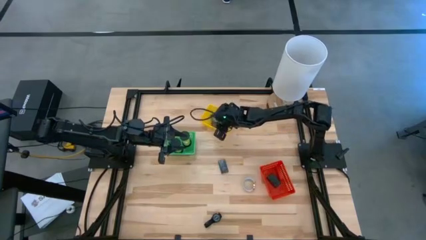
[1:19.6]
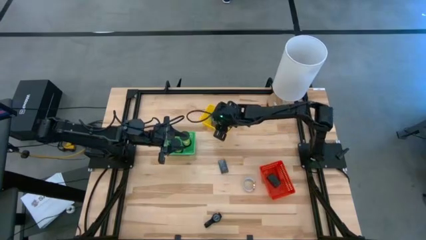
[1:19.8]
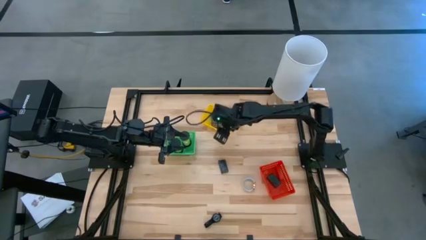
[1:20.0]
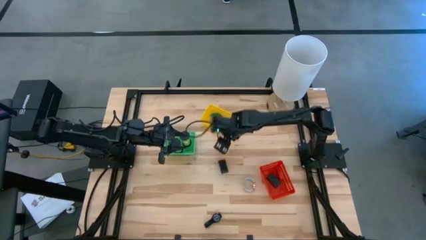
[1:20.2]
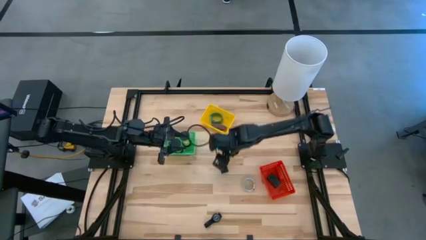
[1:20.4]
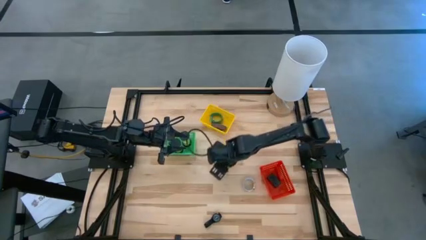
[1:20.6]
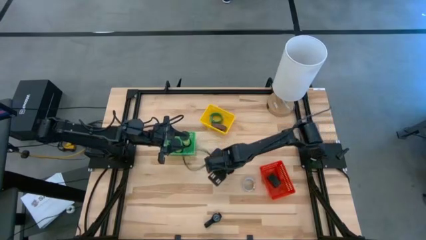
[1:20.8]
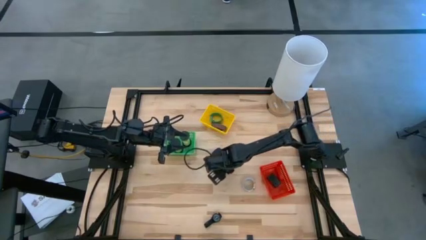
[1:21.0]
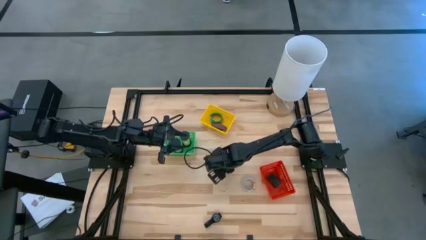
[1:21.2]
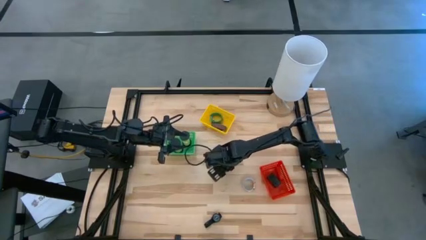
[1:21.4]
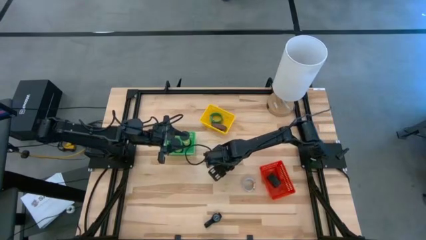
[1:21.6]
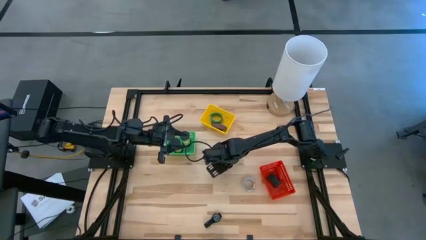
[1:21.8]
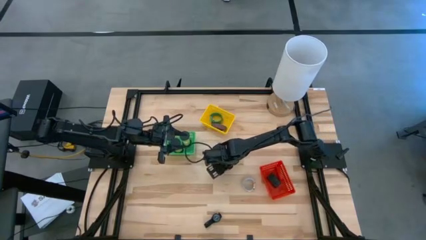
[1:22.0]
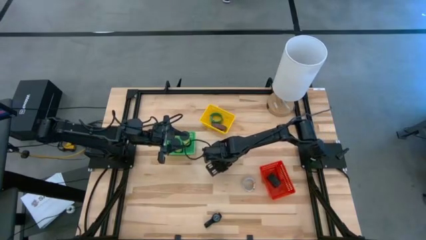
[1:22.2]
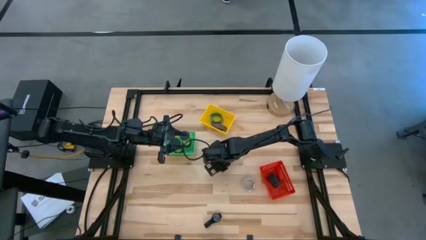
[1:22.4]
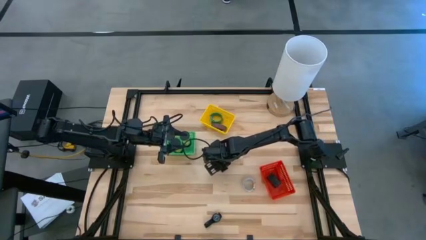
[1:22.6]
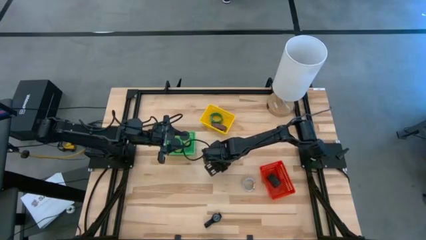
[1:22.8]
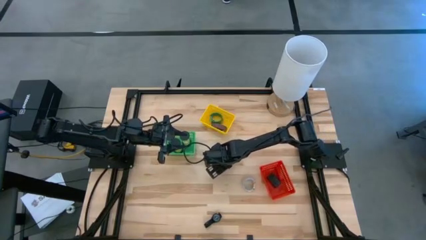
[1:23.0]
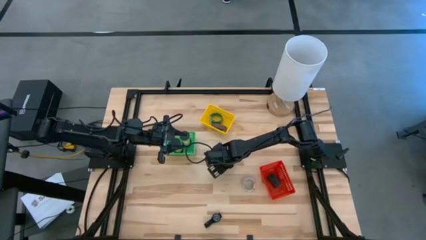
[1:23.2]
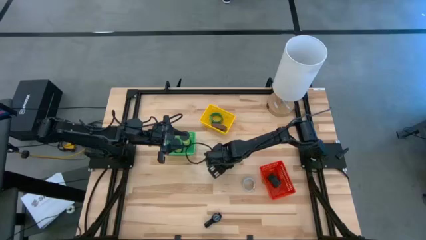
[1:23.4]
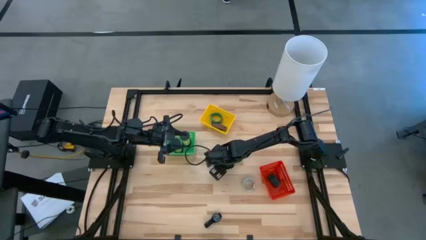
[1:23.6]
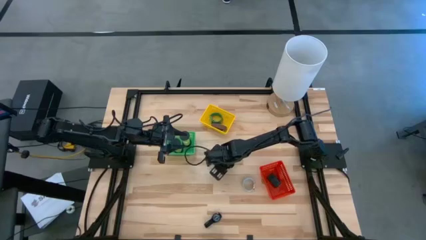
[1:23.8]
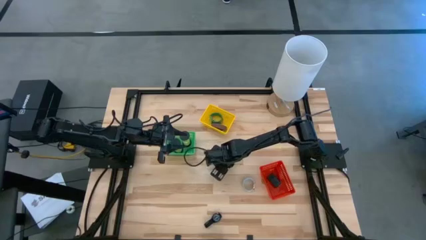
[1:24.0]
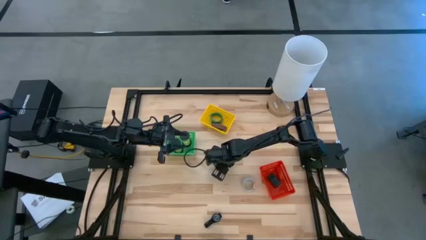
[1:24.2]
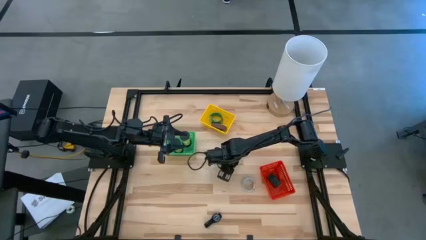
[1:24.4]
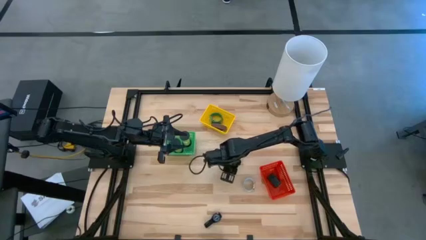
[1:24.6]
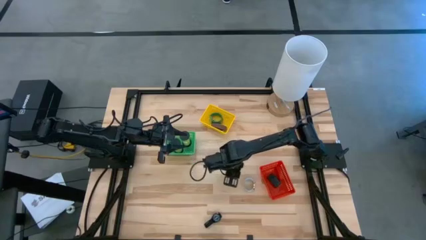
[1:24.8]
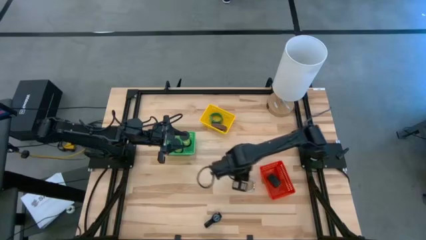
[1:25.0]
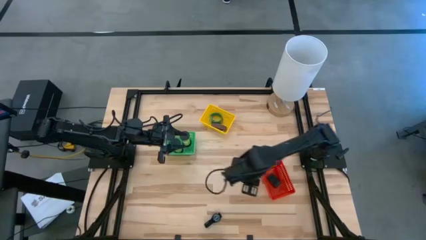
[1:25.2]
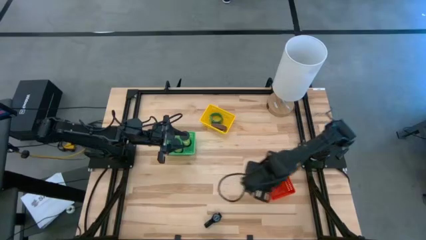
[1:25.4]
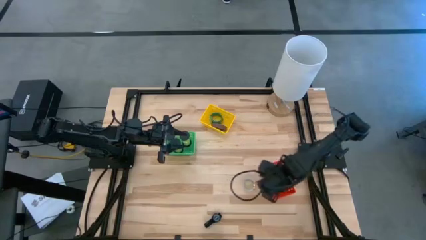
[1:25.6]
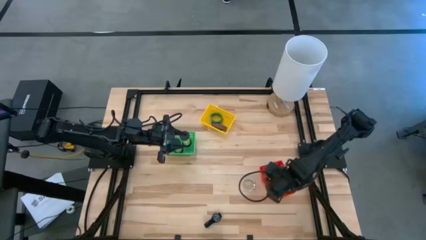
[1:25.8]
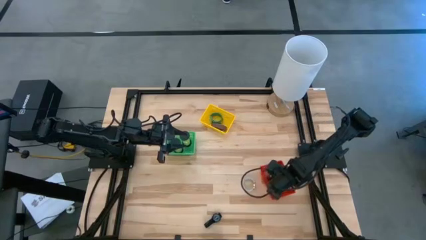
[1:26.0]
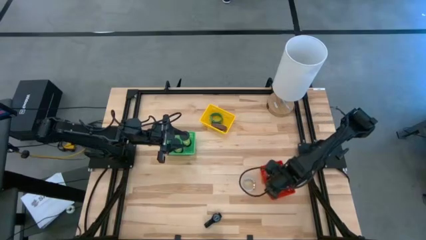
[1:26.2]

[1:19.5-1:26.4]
Task: Pick & Place Office items
Put the black digital clock into the red basket

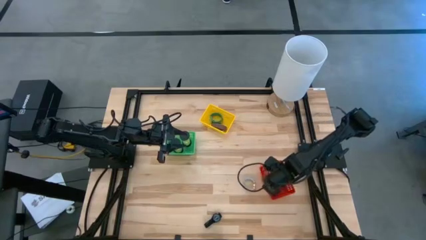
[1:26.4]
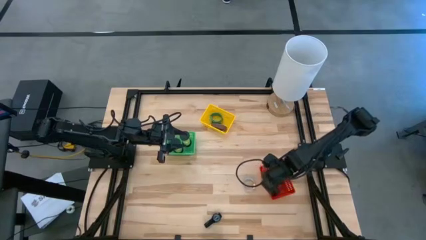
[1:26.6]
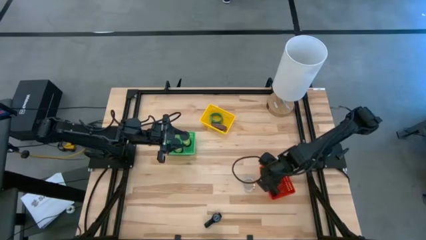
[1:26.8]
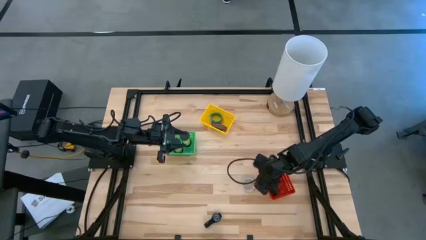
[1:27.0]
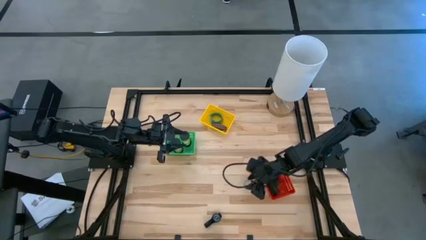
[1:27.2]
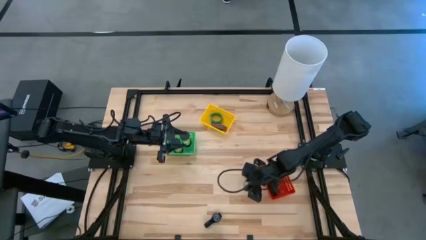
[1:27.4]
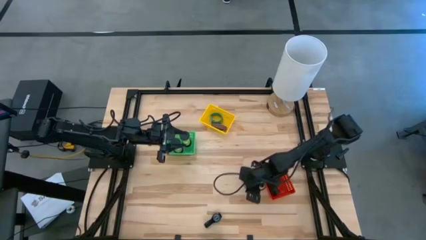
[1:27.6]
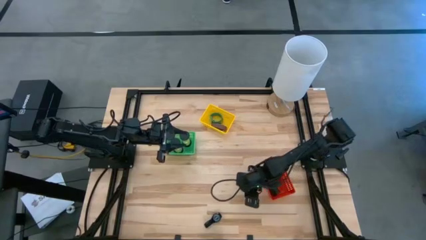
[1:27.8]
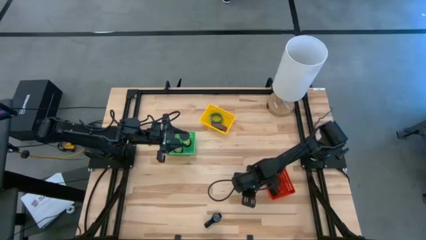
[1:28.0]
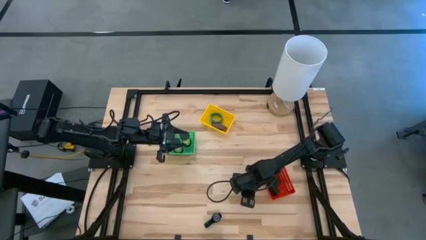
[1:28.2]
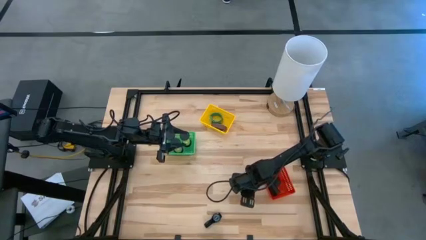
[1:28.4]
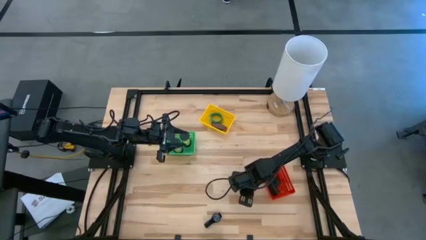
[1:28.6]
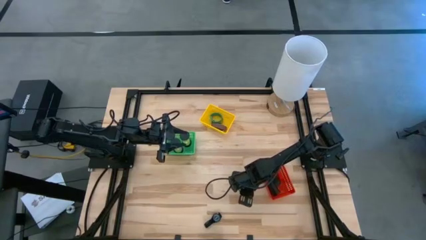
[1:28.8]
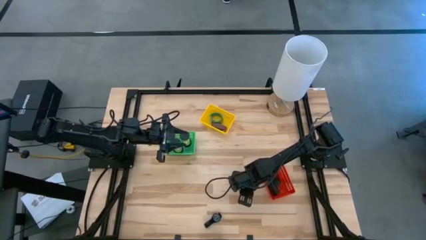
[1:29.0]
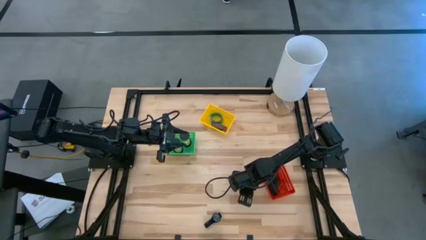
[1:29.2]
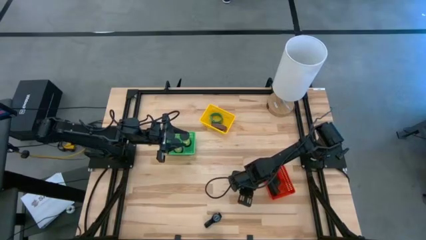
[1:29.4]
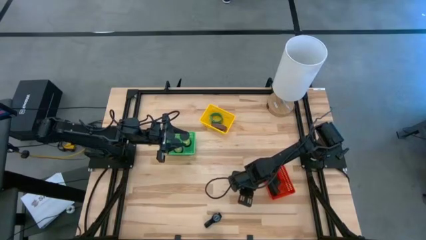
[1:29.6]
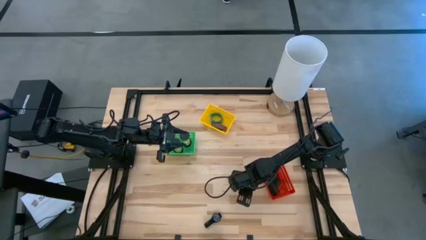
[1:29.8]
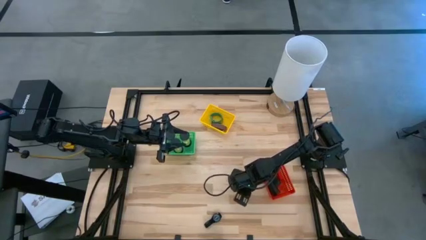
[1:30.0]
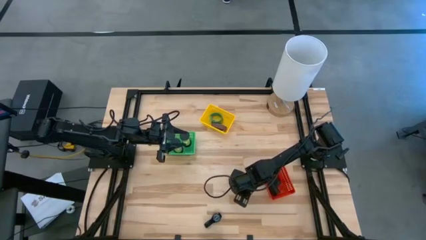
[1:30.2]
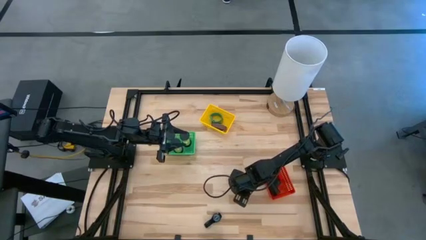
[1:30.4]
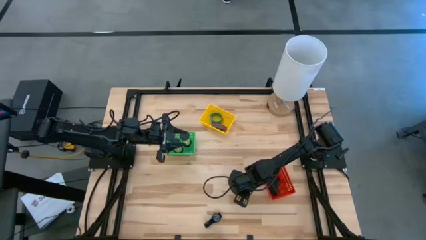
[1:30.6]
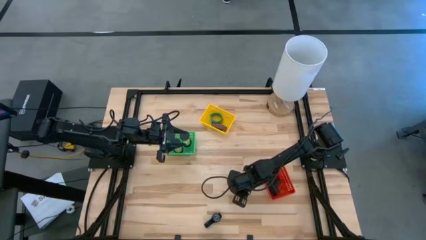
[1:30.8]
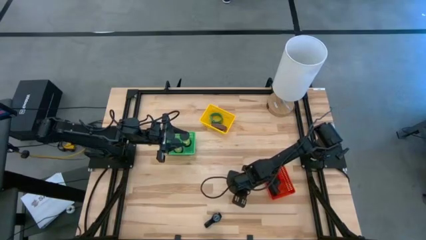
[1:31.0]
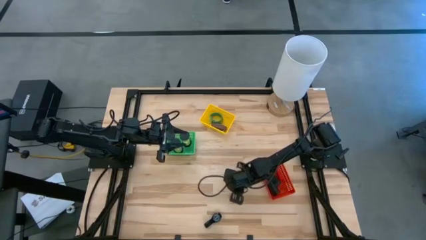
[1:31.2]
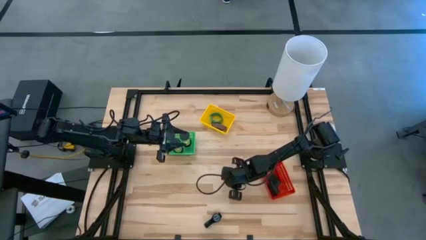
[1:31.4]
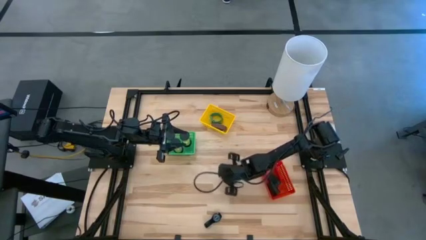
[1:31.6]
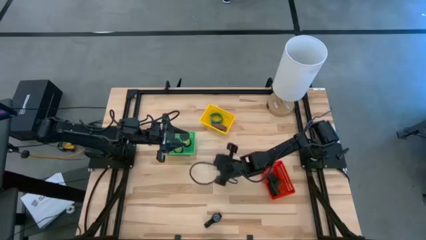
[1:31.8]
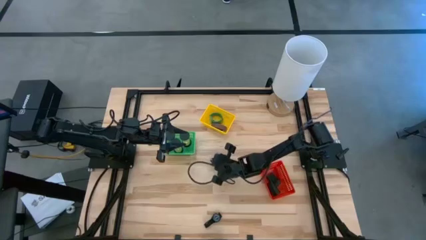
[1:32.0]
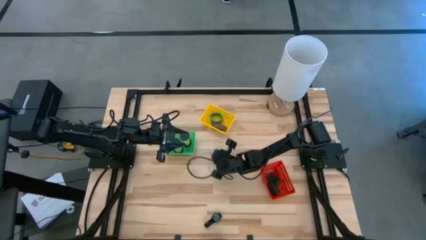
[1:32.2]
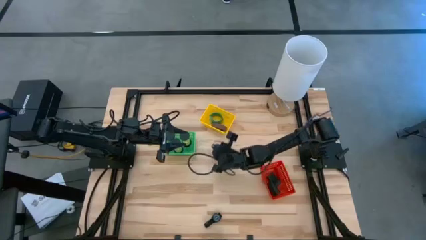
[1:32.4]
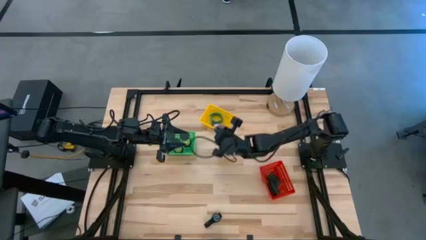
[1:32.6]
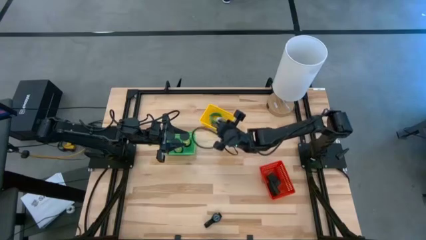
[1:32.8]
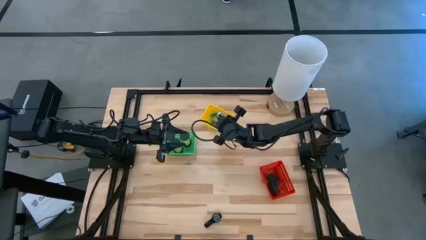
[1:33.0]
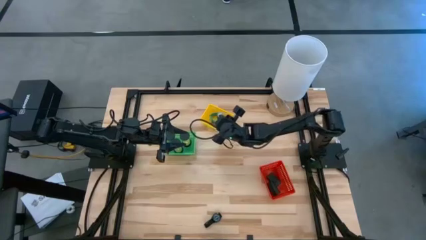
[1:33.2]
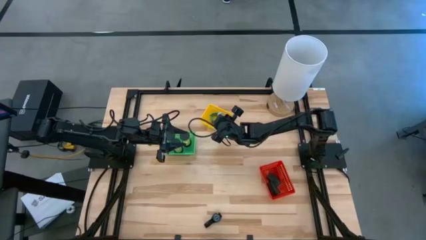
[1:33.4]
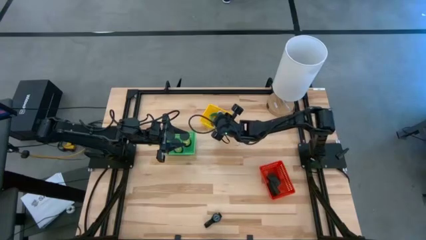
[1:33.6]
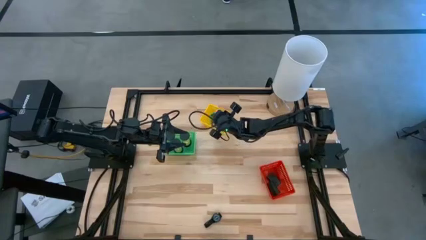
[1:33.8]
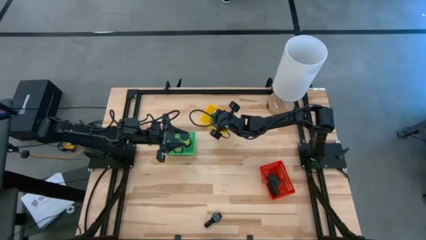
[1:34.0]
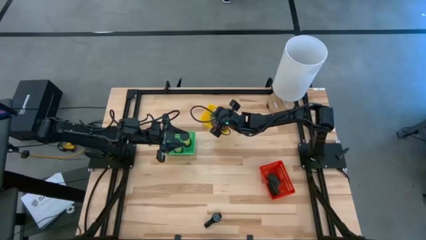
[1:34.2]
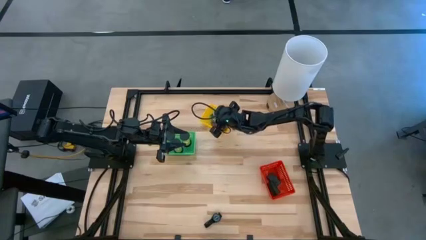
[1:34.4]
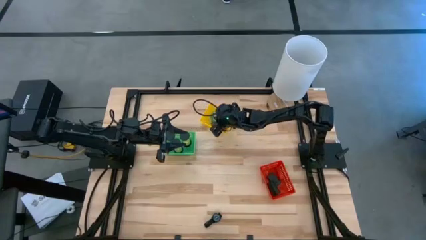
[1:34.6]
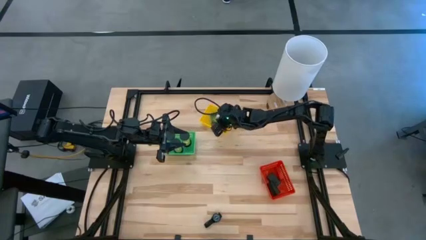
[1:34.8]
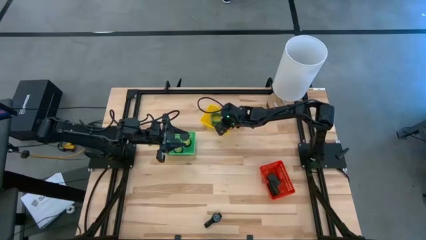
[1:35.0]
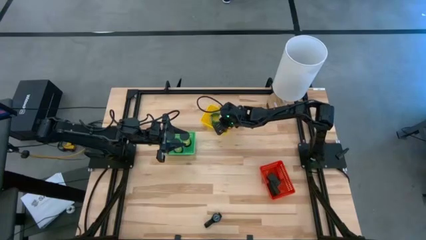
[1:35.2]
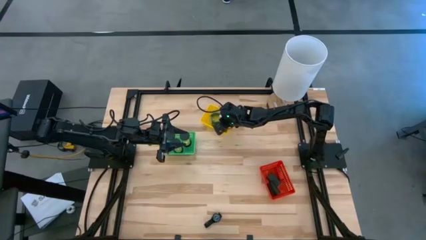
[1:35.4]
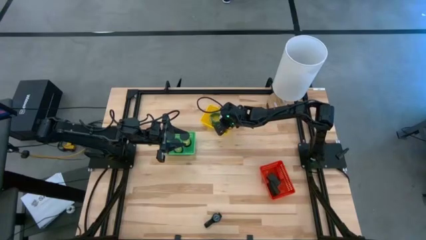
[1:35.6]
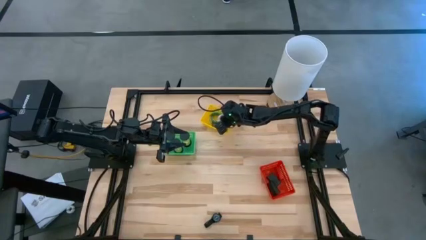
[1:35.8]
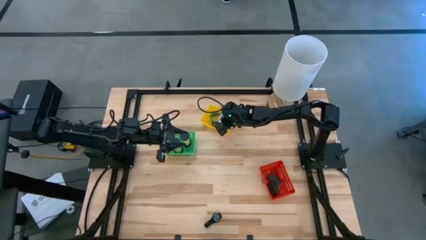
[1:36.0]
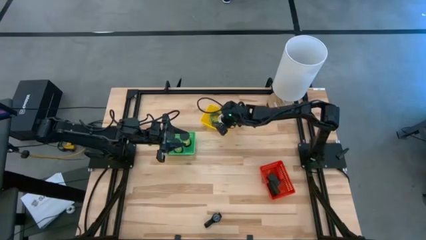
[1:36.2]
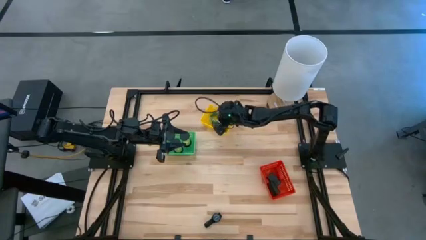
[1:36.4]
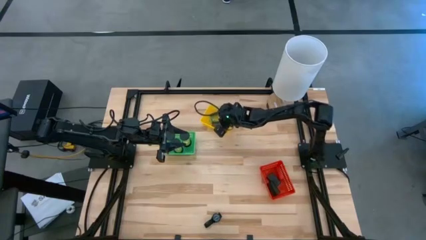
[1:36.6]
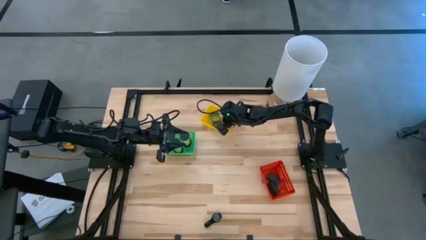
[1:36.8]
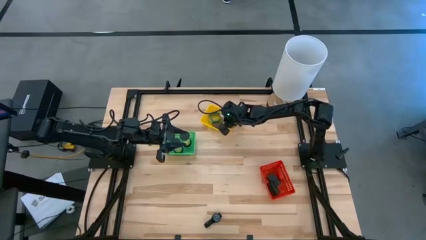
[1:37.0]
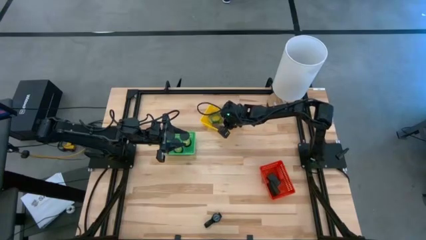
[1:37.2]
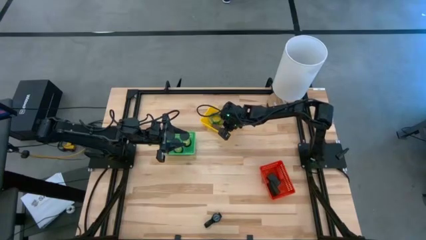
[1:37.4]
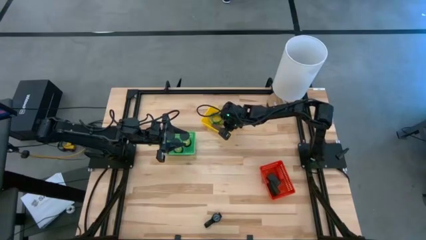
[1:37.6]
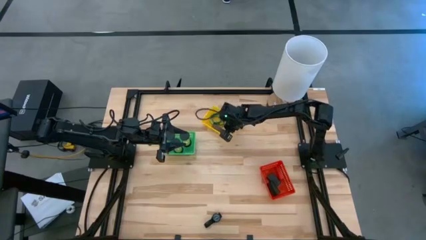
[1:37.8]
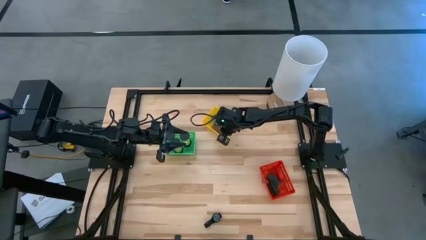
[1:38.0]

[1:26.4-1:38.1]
Put the white watch into the yellow basket
